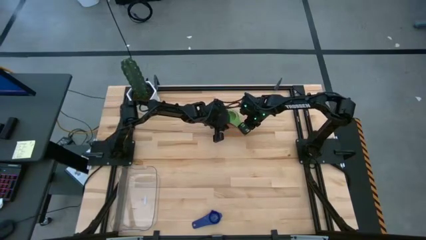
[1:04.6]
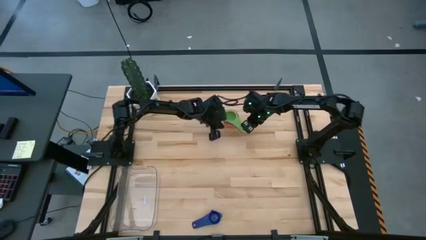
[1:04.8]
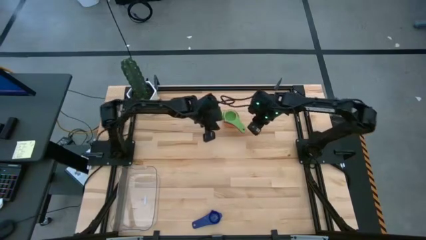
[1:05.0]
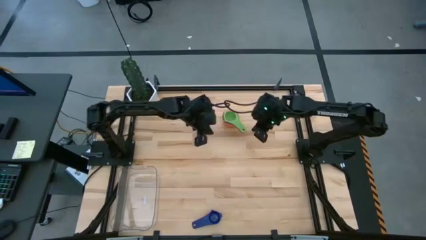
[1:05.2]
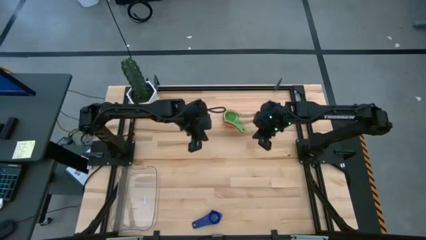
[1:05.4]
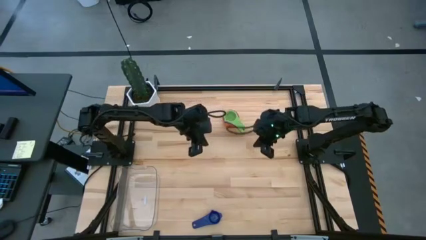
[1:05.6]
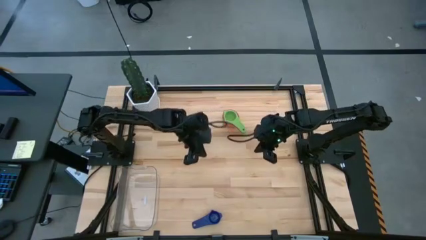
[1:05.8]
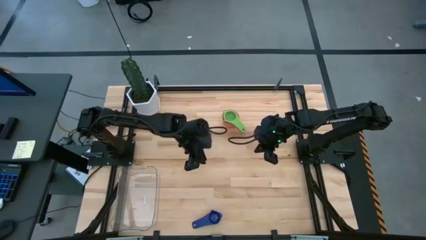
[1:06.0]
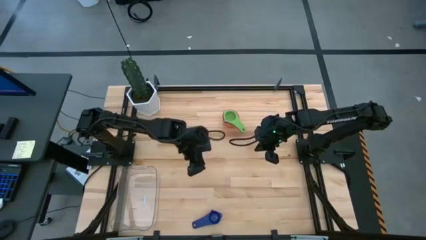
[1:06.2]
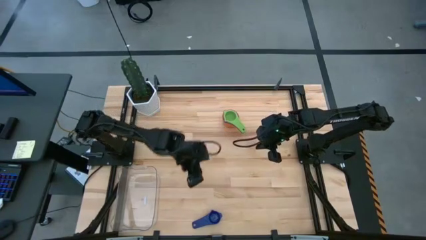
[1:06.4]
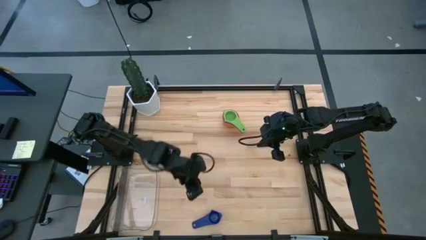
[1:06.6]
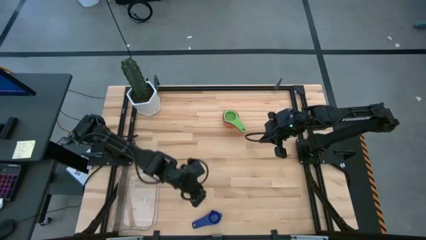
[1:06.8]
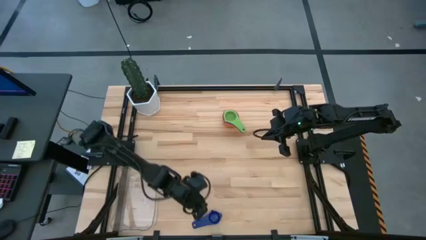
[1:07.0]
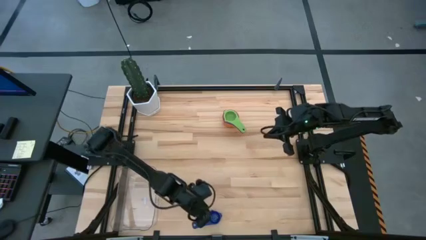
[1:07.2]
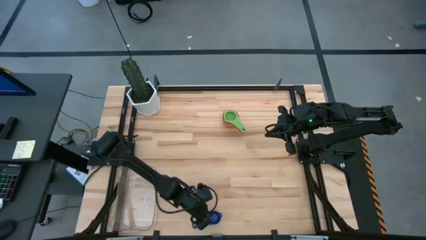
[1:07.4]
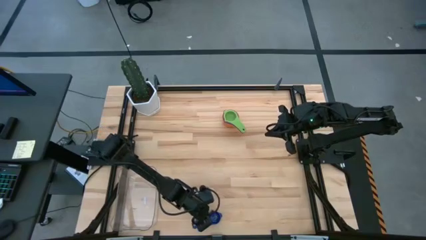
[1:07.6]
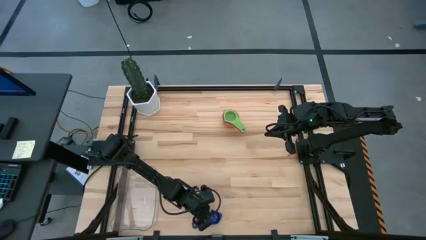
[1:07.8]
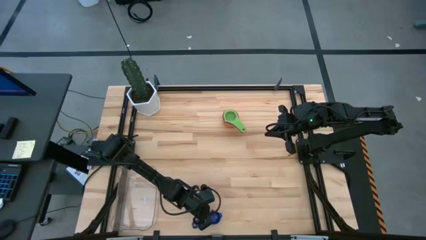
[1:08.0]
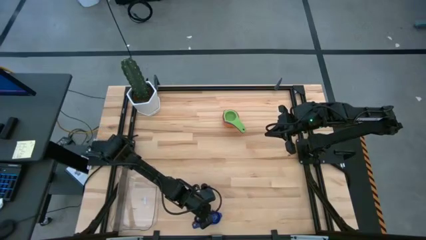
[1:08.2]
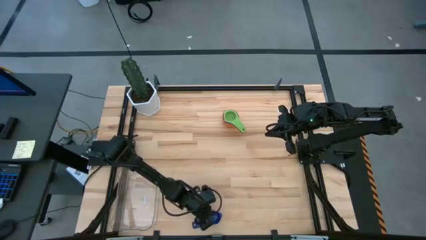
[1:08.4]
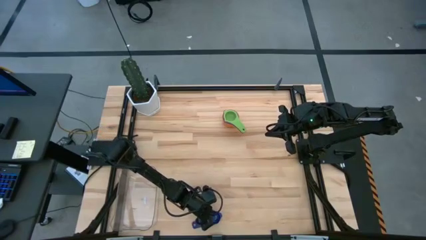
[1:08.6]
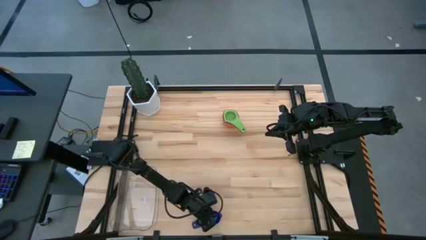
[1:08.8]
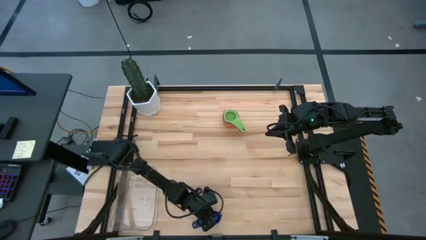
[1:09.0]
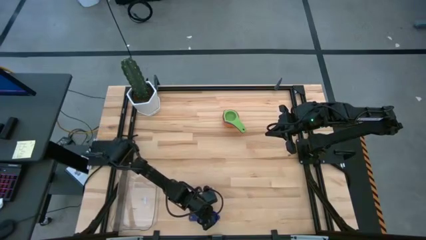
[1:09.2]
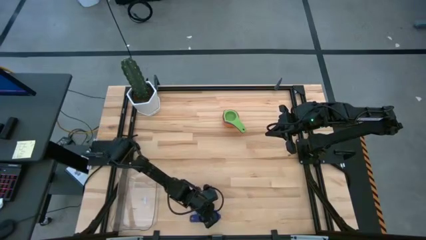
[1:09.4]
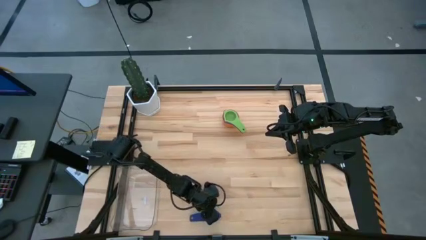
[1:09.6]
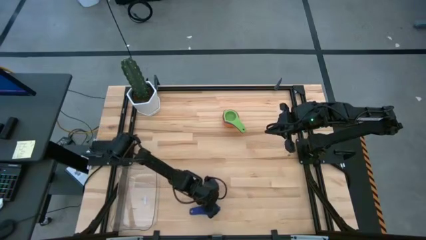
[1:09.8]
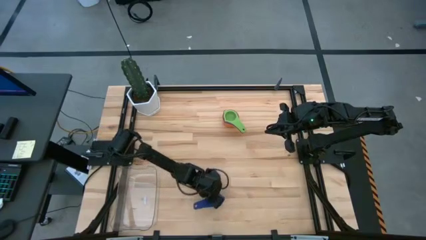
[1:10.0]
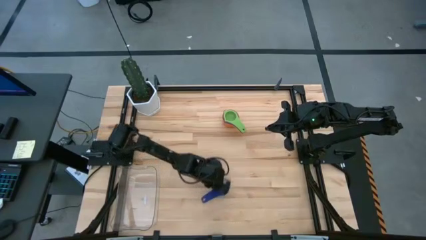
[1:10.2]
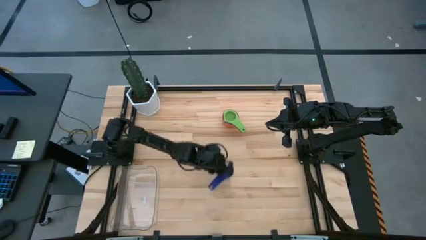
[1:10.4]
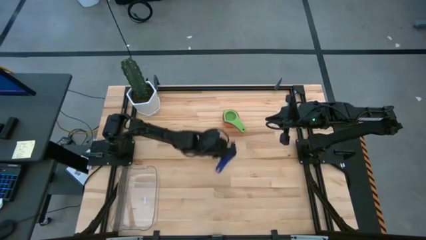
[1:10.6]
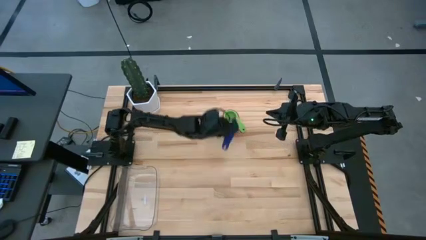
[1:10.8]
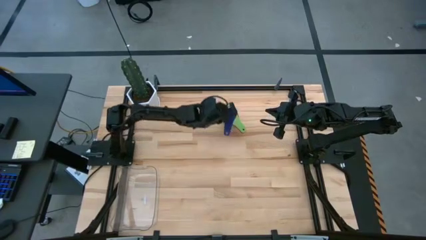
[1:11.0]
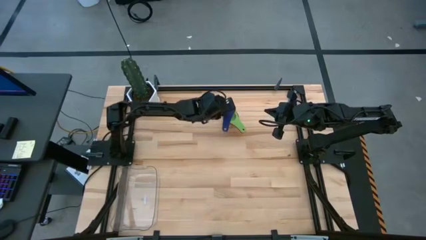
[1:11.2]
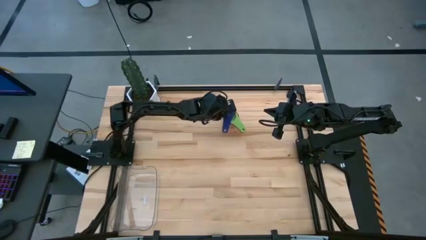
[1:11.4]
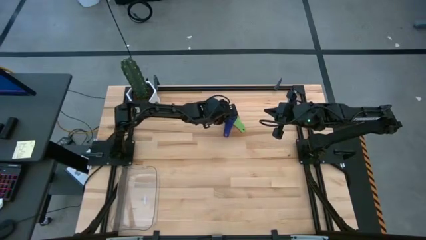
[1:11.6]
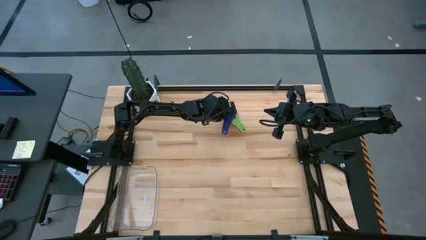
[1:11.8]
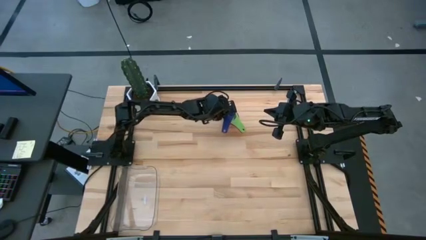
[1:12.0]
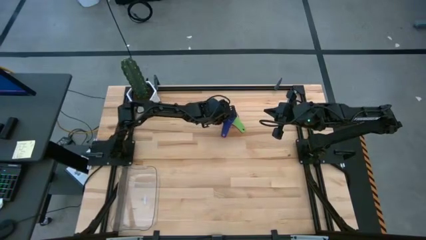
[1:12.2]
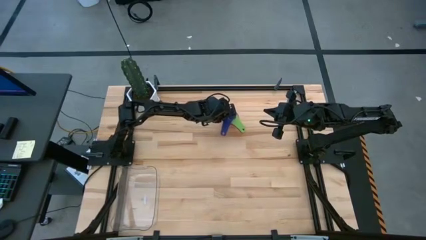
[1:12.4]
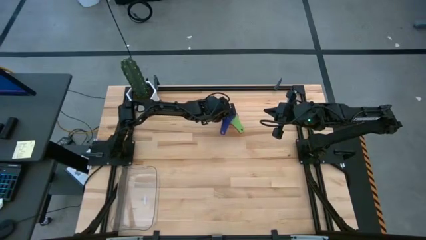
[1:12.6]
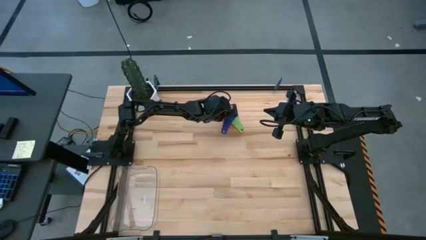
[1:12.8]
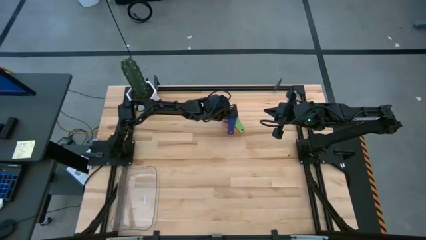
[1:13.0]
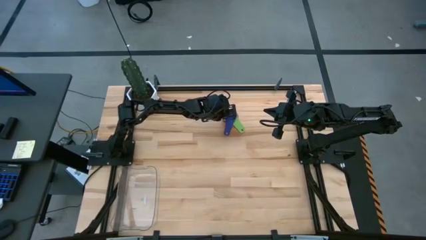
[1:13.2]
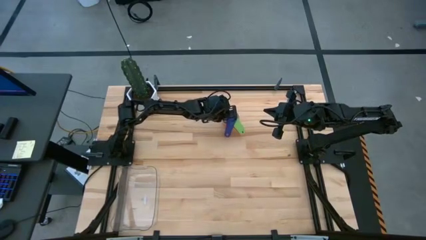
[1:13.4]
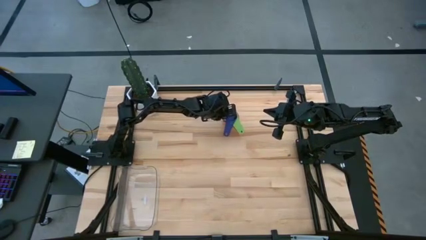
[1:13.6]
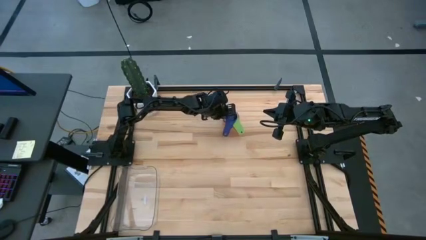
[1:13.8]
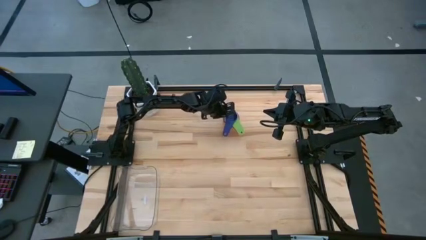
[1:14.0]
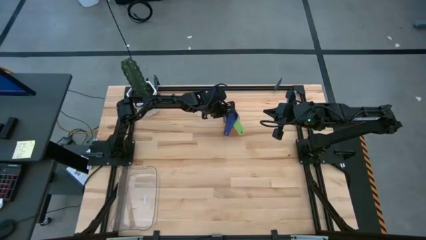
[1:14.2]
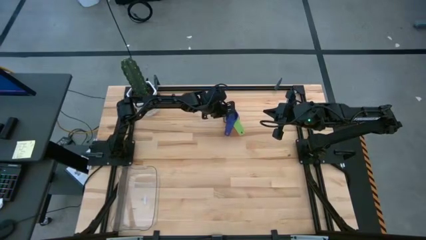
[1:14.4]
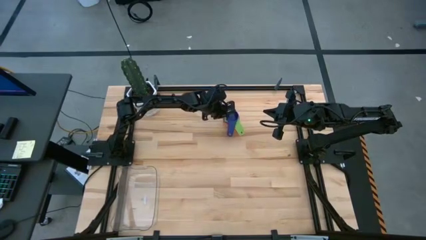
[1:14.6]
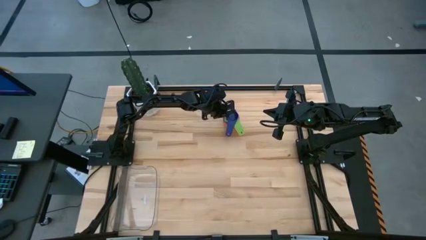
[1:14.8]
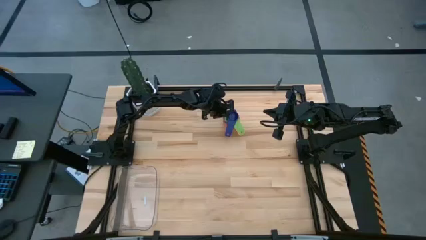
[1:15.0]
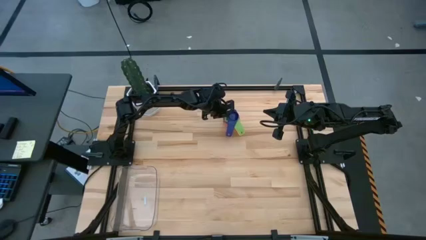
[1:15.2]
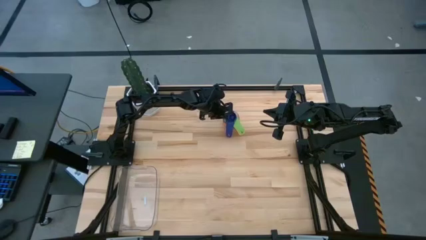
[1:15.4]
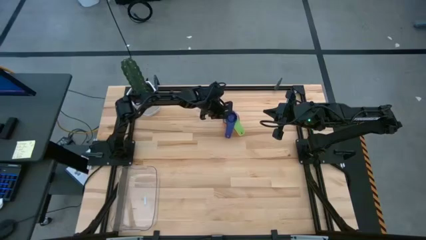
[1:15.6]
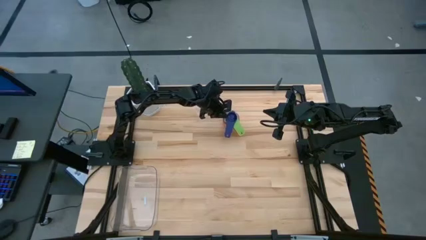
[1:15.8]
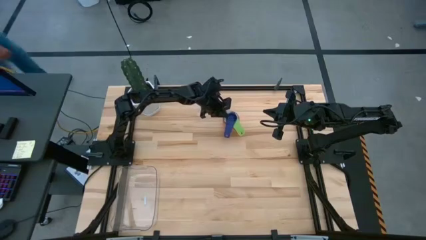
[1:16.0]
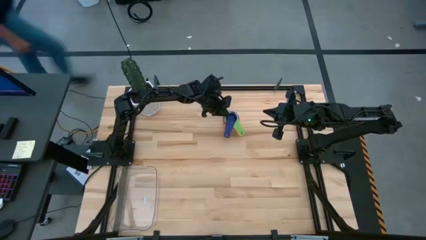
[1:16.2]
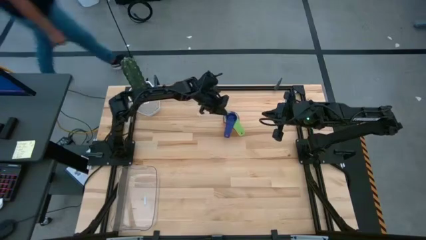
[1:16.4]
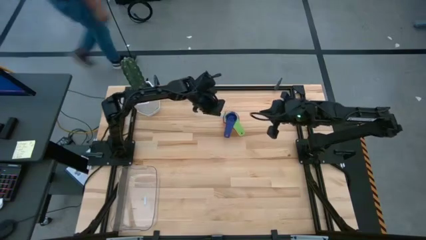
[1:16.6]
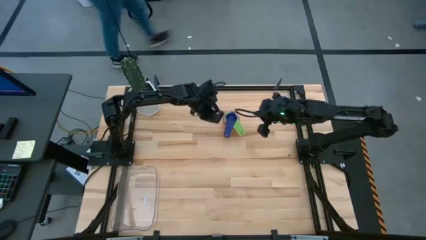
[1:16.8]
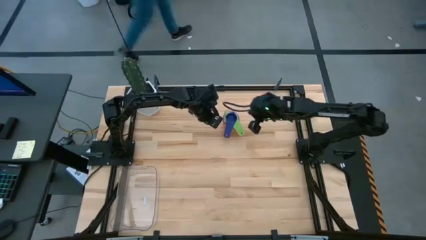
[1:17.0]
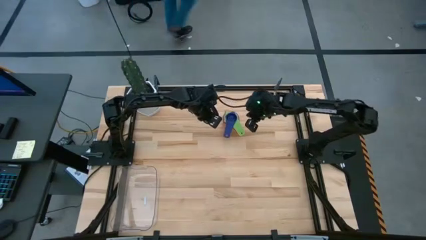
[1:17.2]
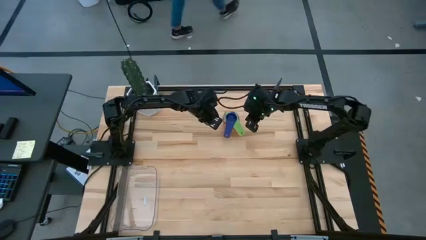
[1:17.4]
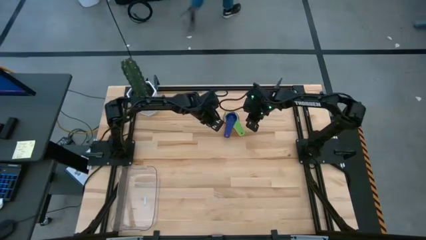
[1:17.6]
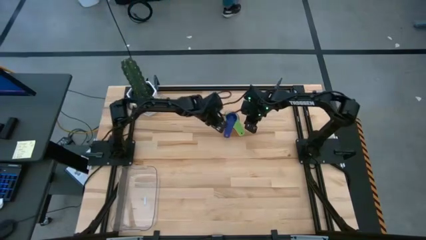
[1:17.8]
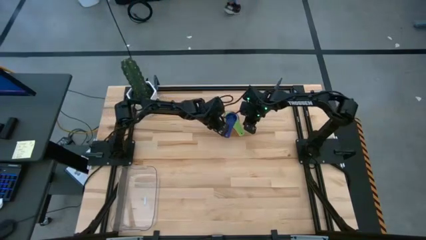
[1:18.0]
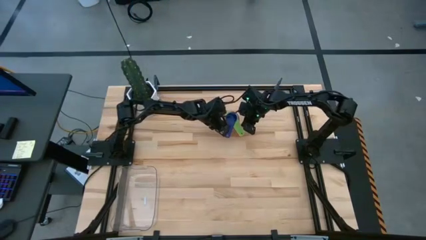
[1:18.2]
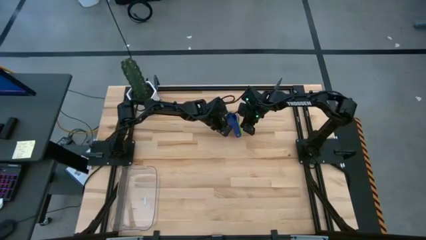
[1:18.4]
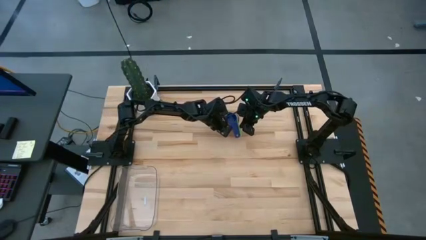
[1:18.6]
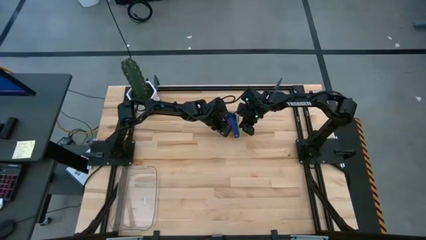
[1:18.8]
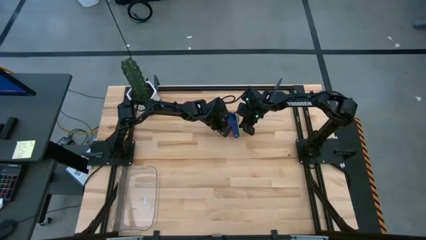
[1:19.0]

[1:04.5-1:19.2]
Task: Nest measuring cups in basket
Stack the dark blue measuring cup on top of the green measuring cup
